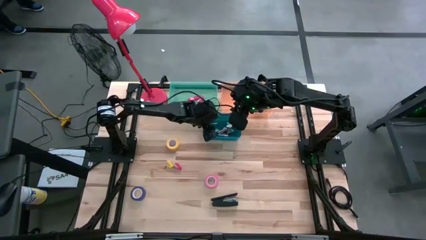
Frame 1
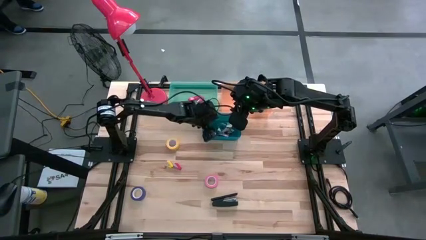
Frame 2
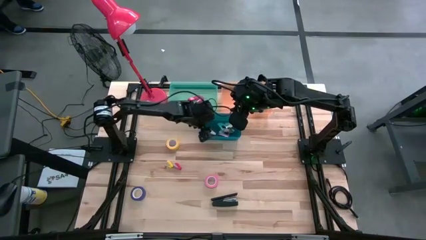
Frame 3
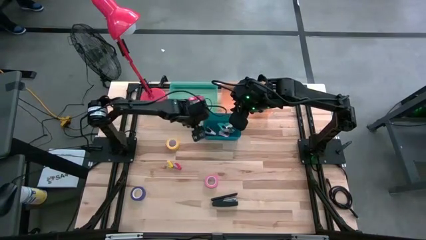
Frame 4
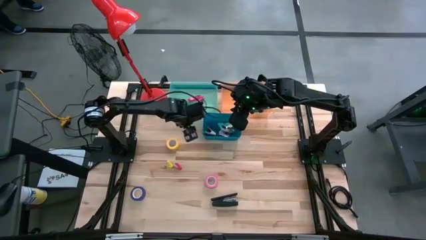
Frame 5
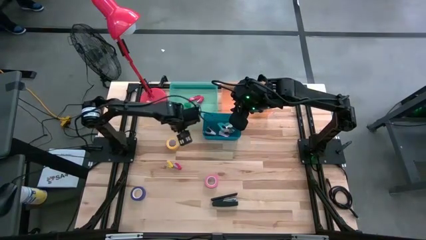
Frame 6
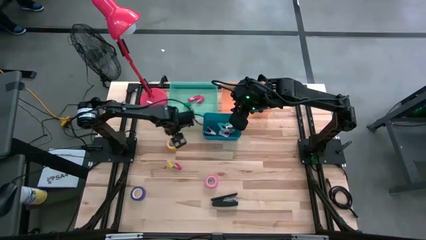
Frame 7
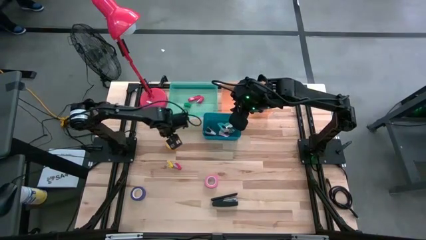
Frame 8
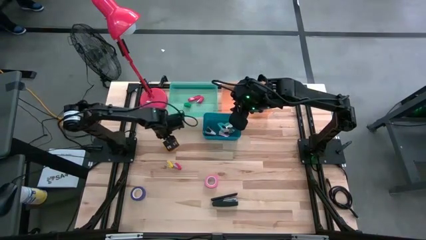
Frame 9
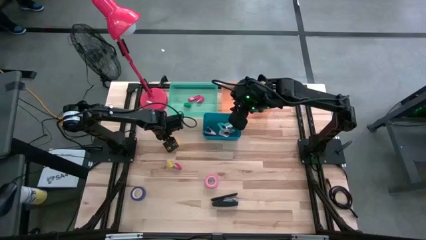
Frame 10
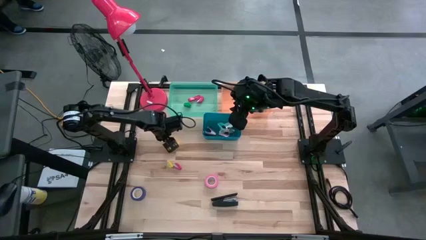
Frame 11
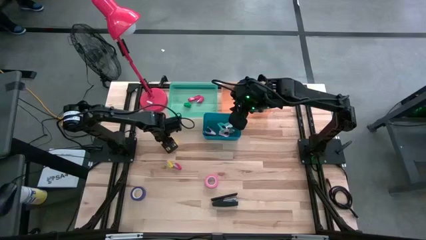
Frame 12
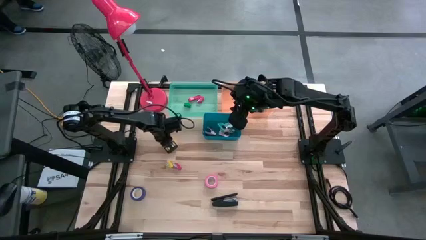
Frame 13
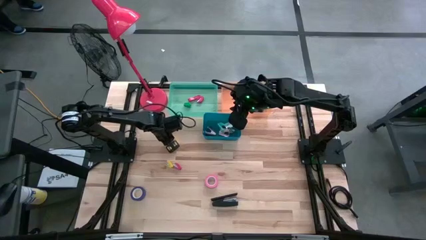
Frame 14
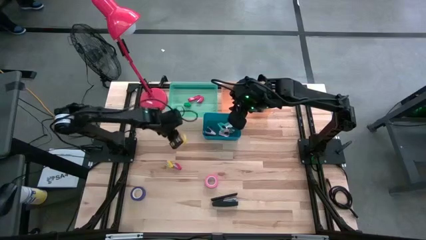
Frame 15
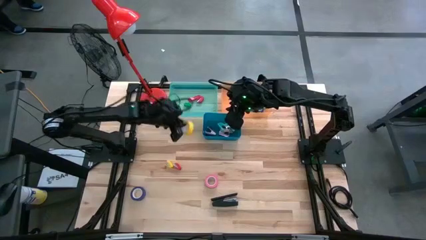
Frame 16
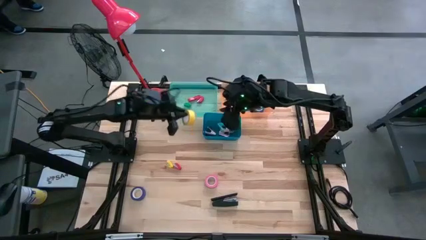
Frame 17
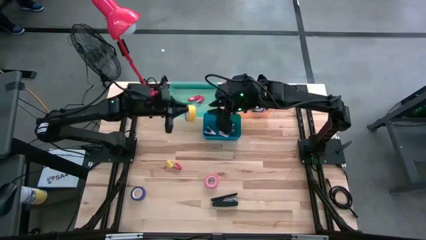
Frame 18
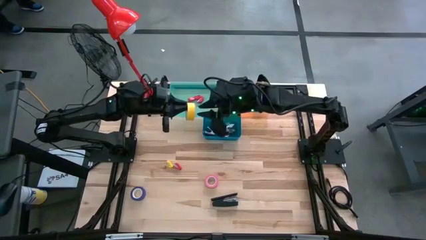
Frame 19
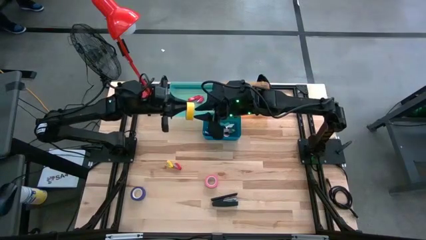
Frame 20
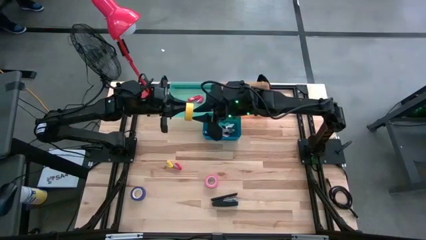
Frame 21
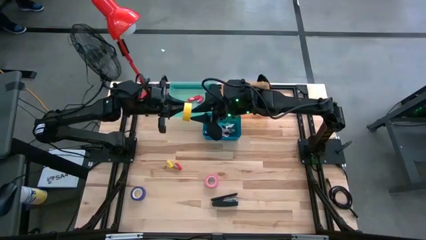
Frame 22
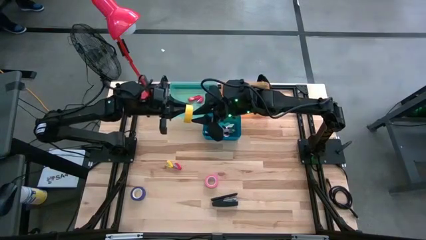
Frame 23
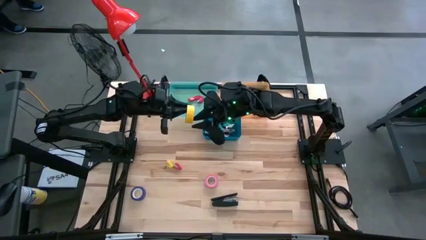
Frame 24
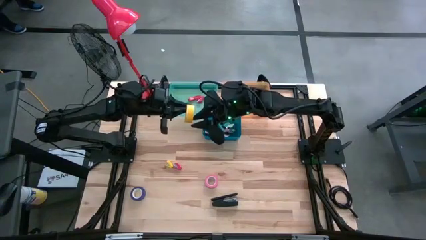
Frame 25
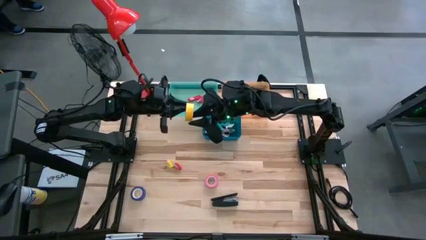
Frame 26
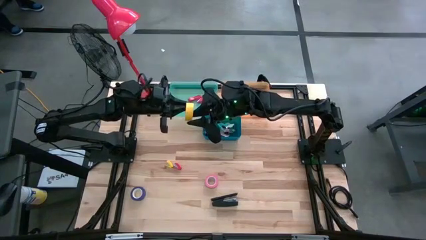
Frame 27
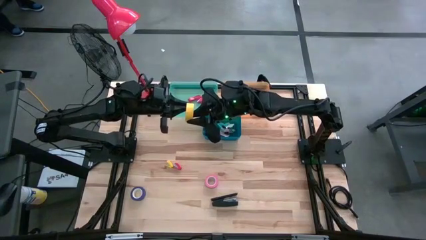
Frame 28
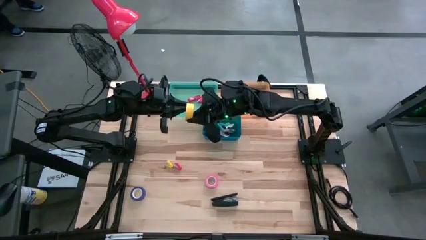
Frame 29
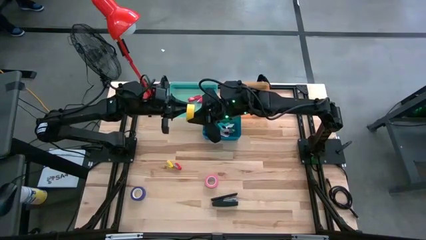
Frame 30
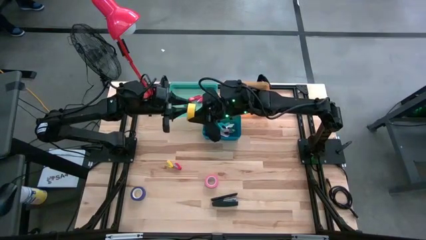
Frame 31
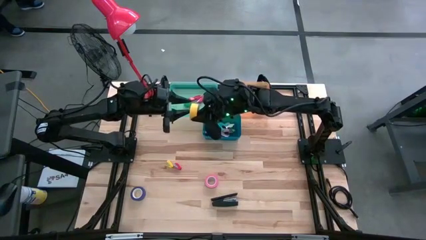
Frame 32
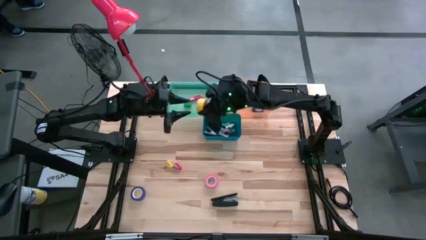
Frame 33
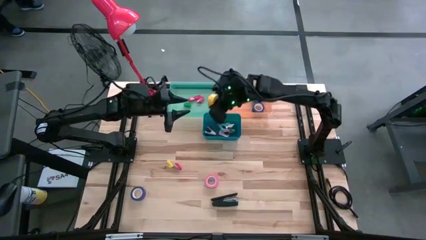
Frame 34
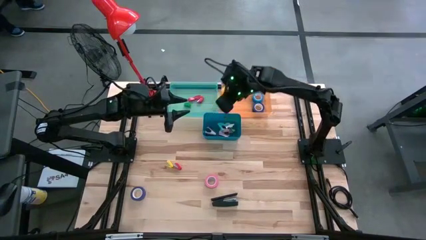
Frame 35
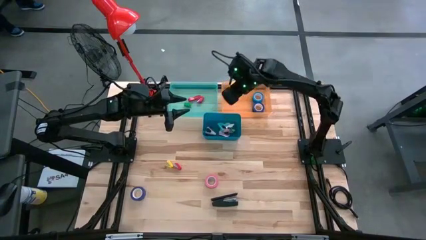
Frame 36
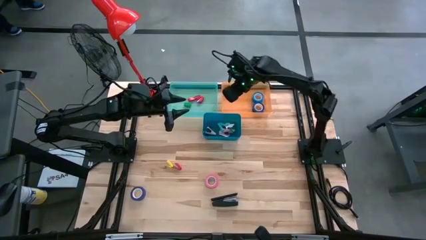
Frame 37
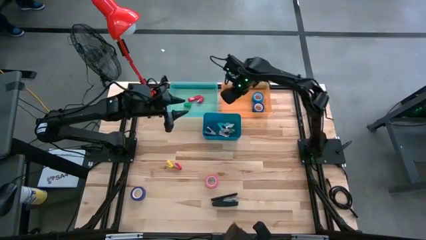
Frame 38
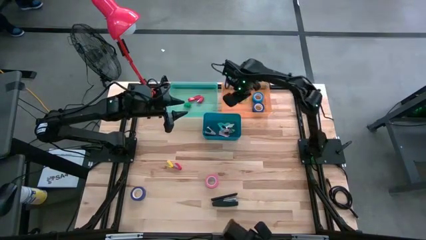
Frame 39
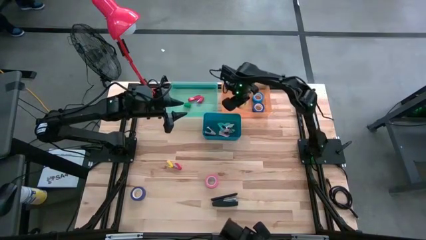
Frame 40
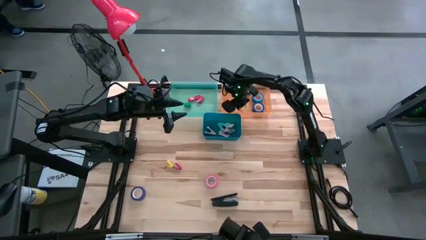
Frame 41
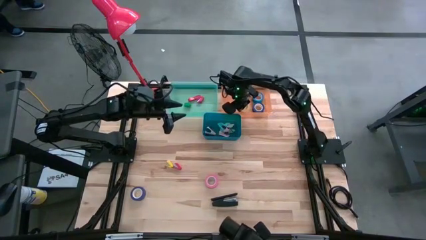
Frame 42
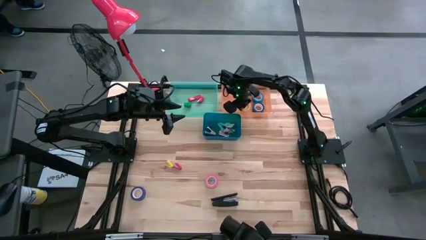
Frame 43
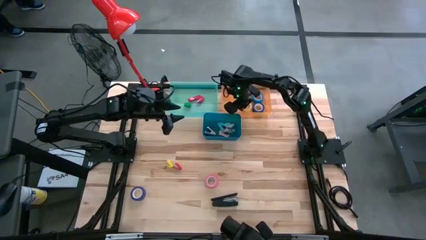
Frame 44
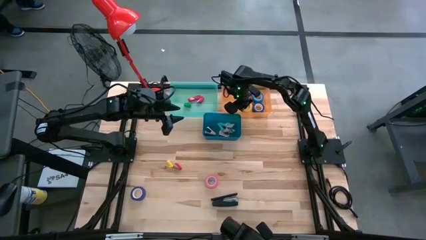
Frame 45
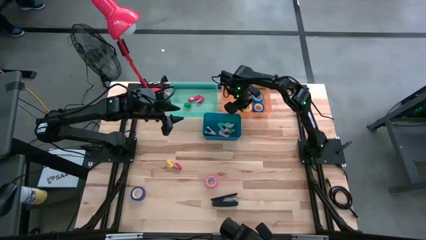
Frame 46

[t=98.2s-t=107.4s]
Task: Pick and place Stapler, Stapler remover, tape
Put the yellow tape into the orange bin

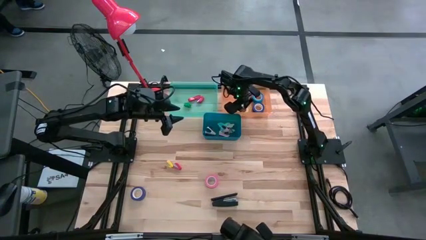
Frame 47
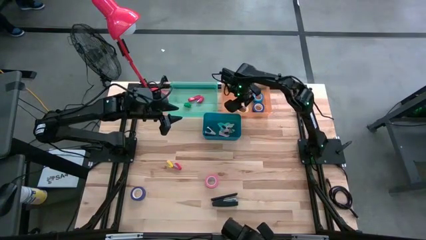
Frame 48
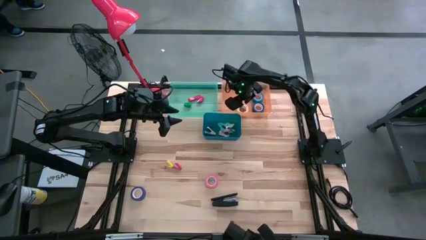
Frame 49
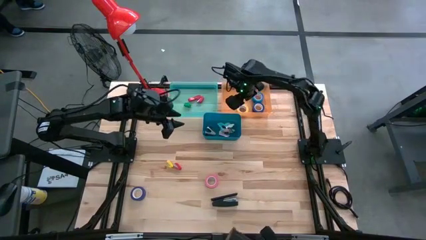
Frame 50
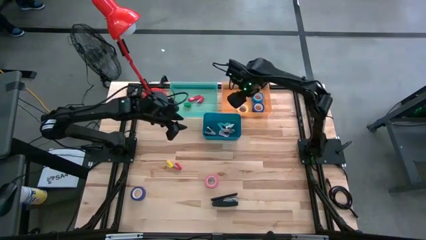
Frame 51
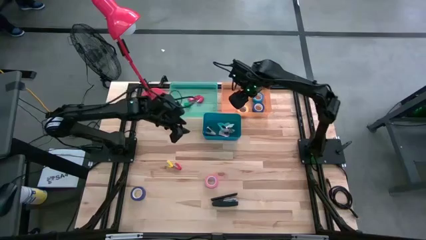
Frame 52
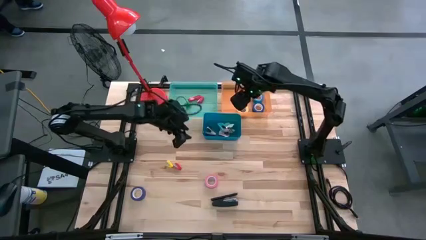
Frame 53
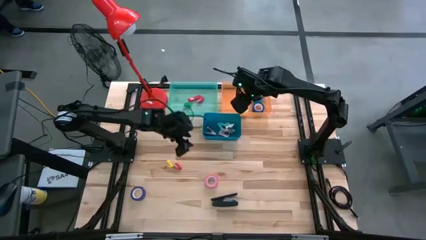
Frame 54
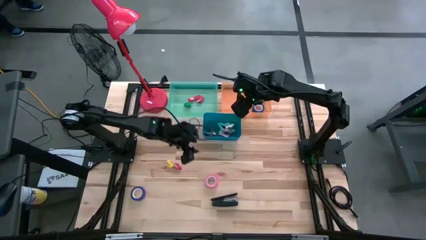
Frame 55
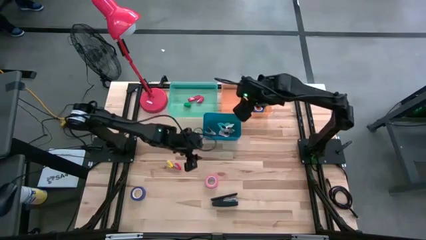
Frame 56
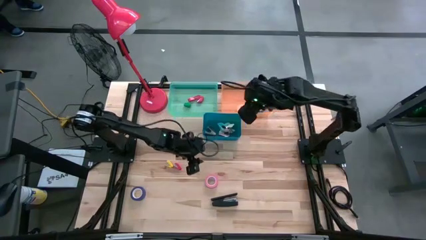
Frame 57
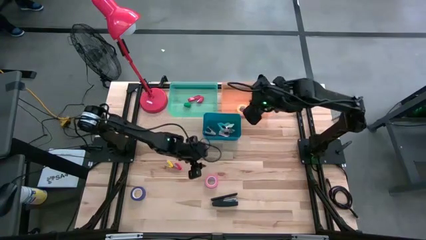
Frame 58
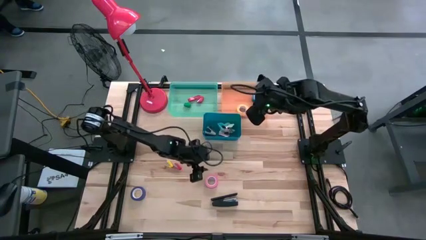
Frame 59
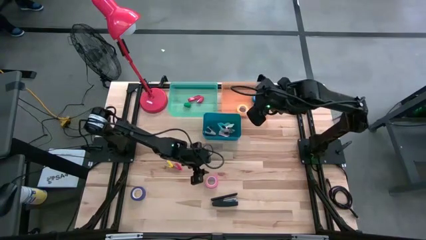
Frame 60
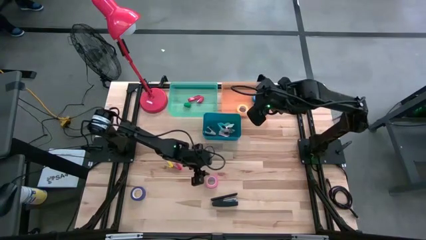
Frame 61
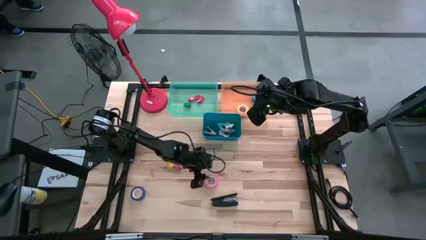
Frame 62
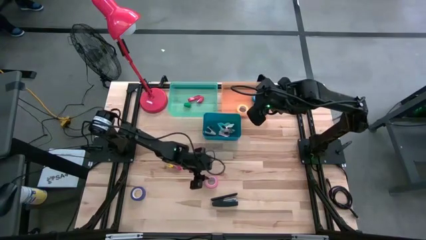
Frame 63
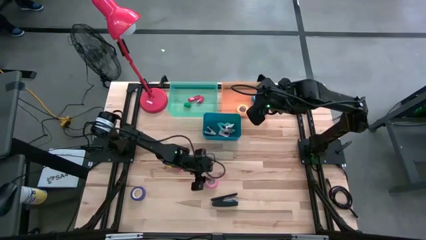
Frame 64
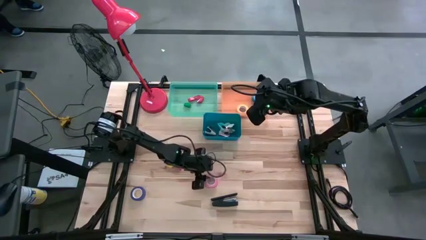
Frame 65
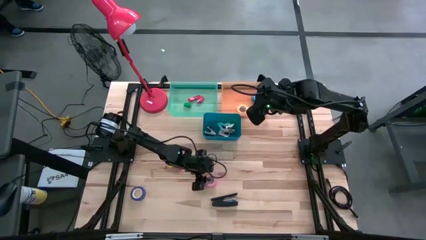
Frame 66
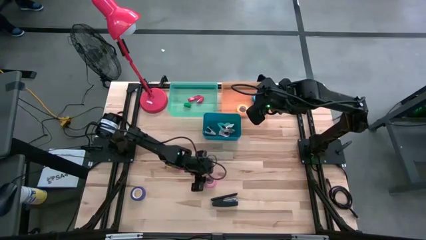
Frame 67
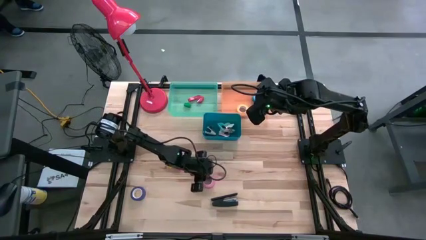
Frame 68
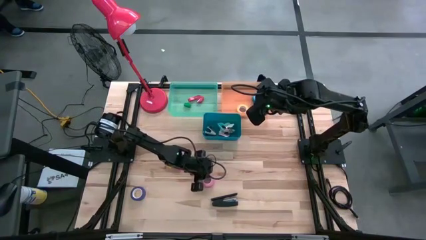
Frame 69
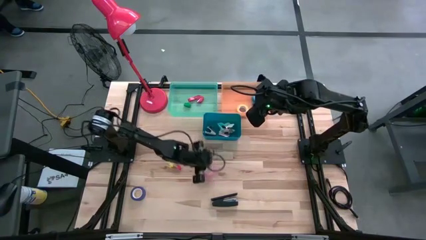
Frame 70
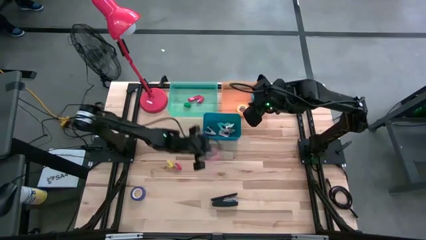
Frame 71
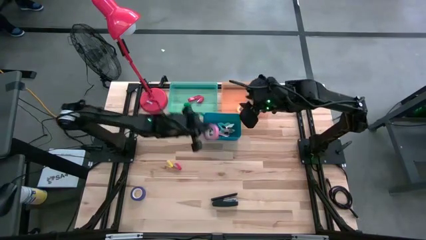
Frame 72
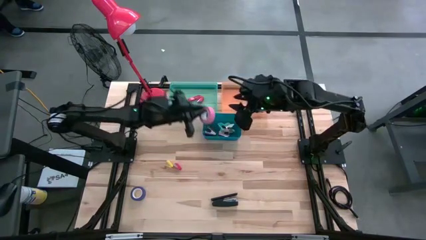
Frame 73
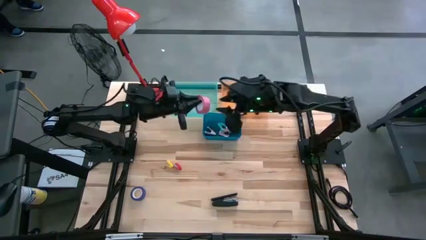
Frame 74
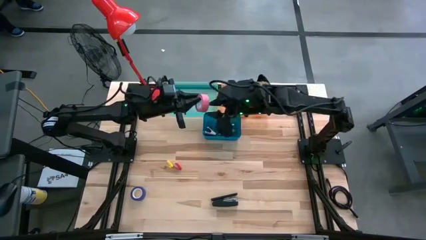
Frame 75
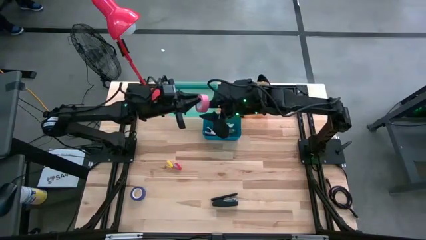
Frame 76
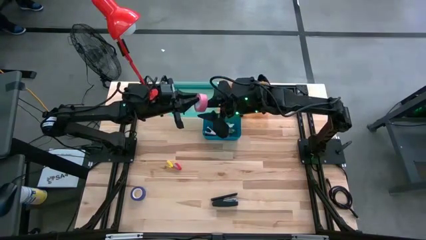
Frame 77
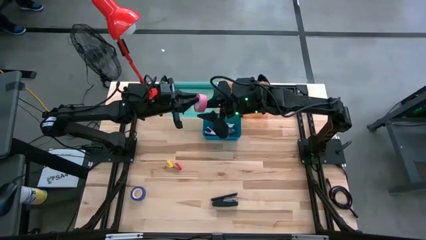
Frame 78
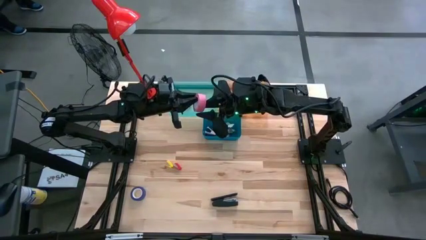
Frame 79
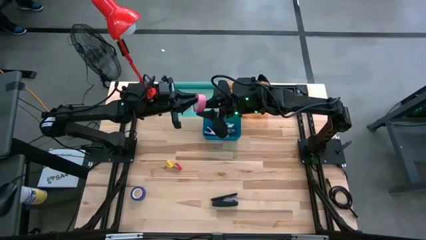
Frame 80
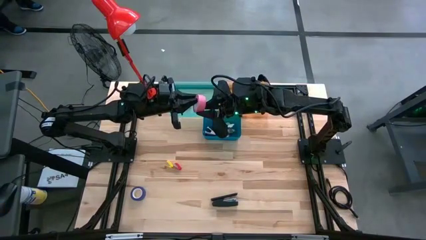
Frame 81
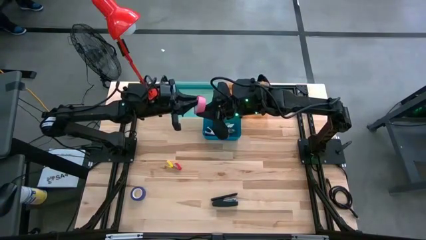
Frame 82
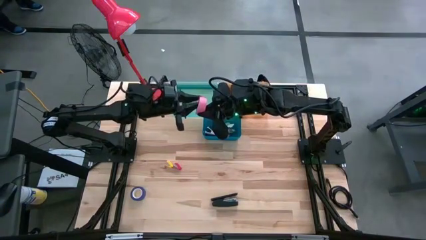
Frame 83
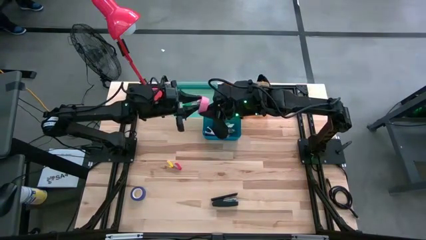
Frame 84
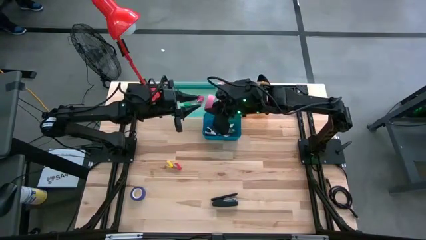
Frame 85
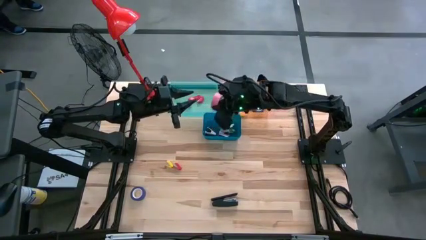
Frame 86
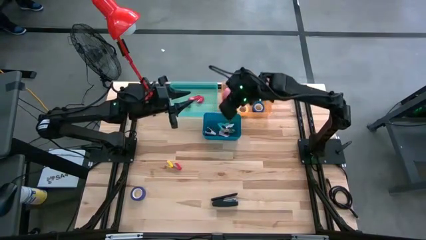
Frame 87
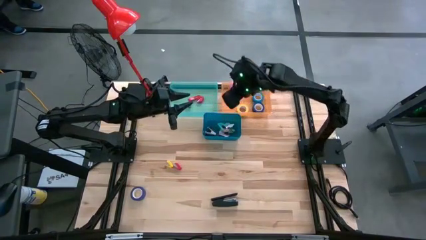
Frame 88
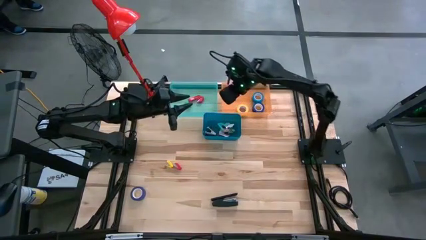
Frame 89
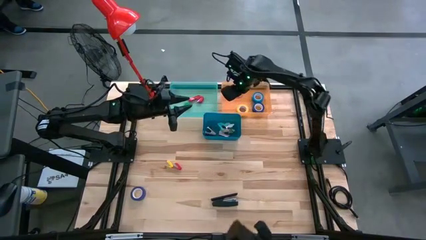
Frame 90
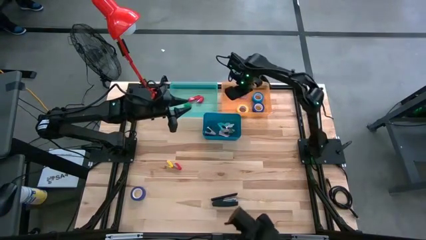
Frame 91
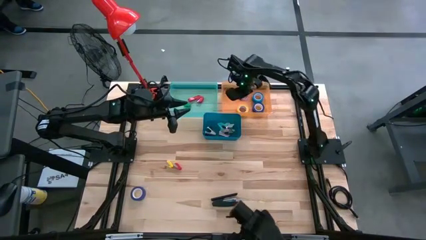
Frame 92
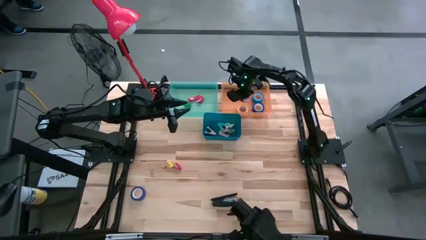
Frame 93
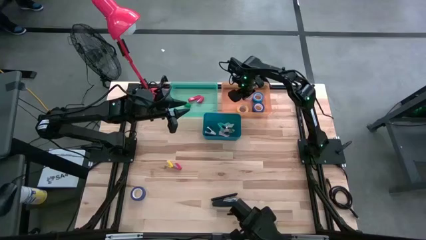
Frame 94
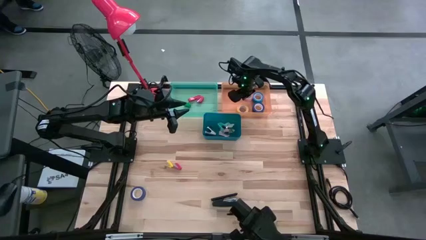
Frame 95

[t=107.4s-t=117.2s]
Put the pink tape into the orange bin
